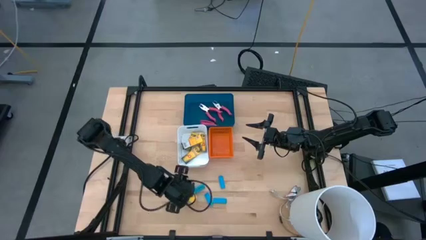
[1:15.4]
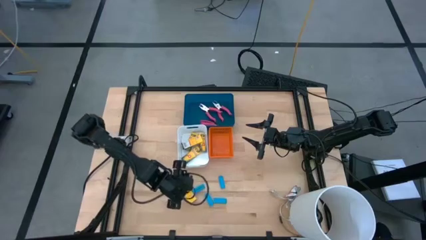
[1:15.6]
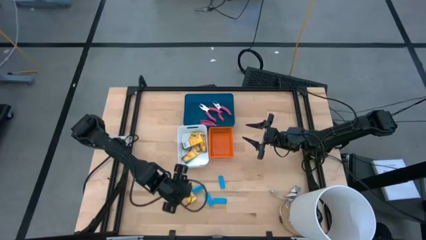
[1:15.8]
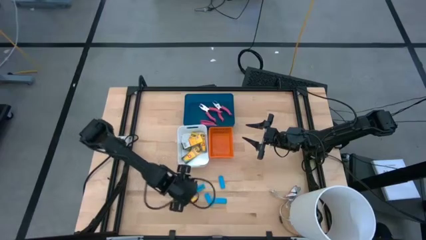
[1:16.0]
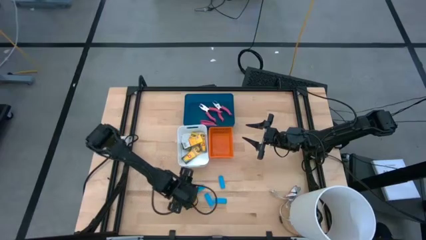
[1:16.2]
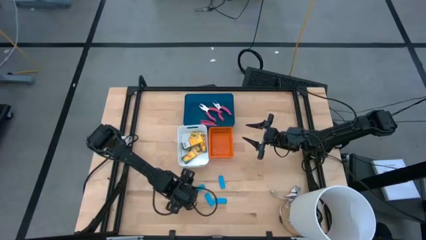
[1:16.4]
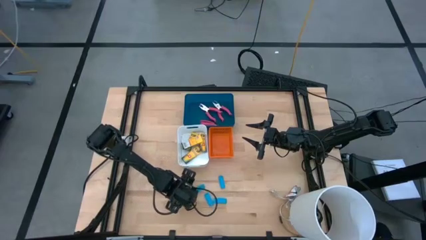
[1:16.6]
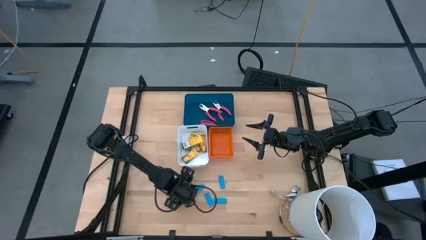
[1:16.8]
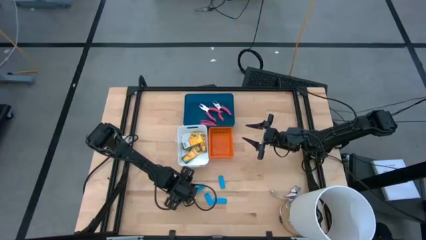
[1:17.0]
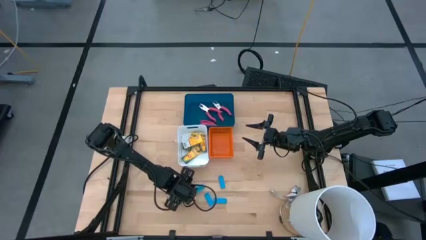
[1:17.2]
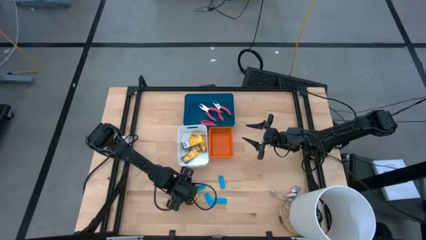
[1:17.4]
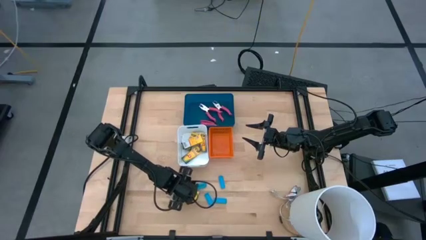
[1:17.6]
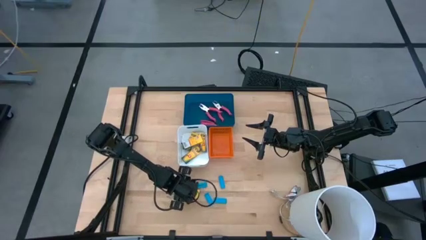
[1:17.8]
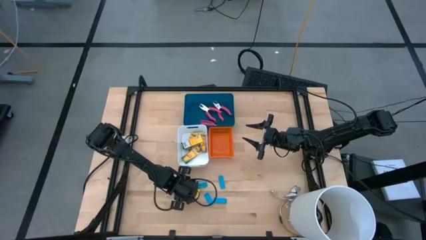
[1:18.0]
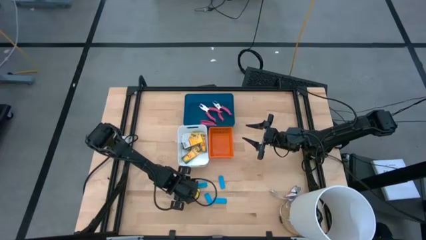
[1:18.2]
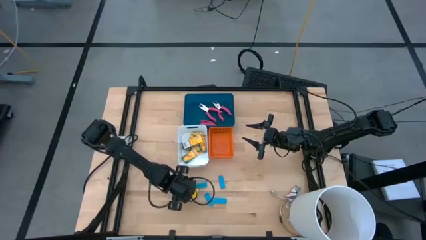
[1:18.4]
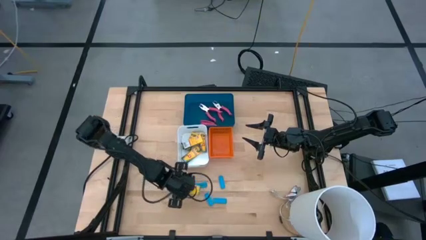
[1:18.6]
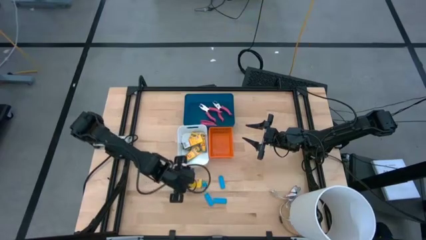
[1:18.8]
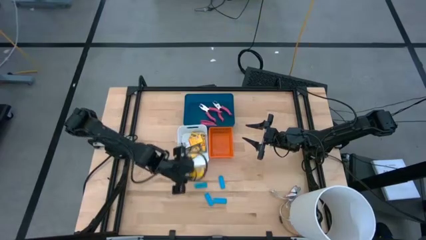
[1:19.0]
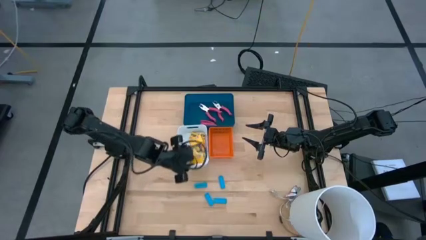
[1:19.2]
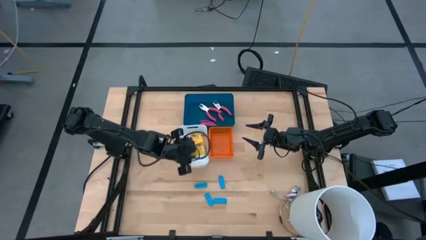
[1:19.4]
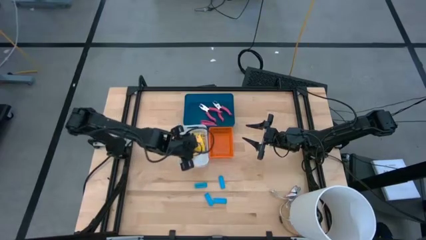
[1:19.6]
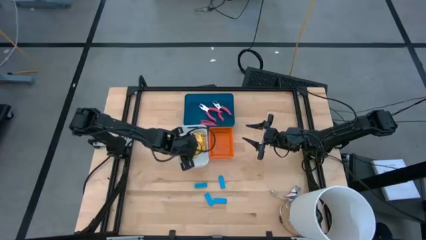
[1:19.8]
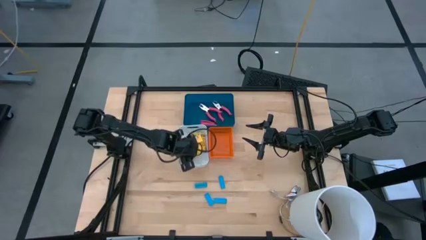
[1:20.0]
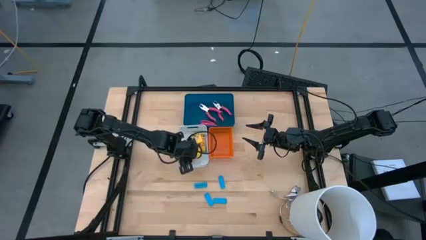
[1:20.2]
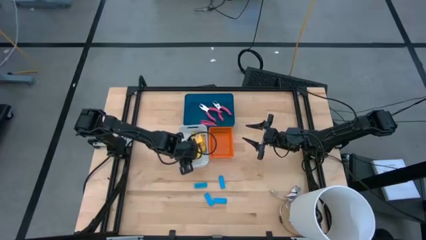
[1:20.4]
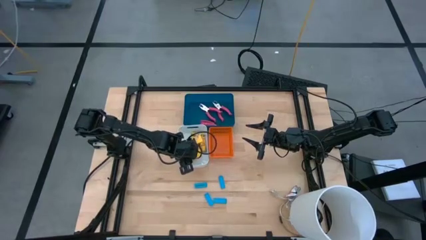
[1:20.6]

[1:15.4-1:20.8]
Task: Pick & Place School Supplies
Put the yellow crayon box into the white bin

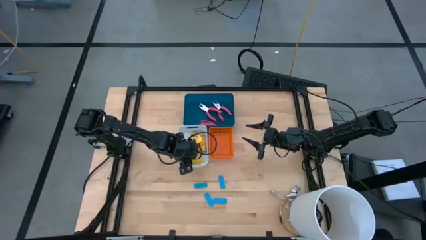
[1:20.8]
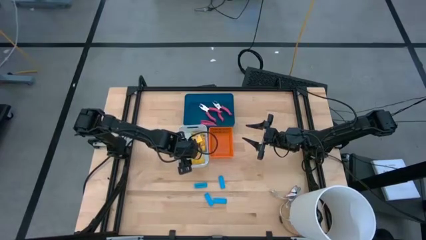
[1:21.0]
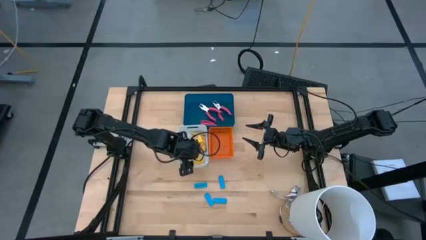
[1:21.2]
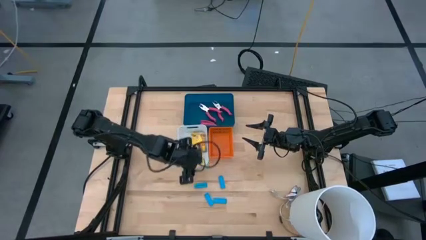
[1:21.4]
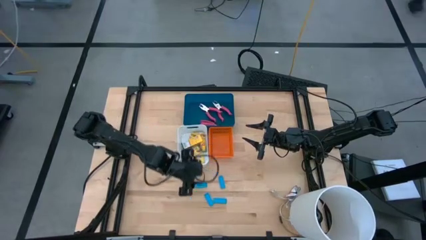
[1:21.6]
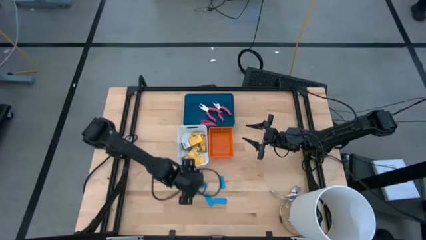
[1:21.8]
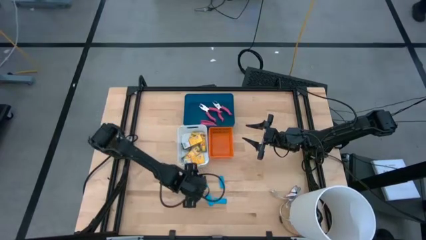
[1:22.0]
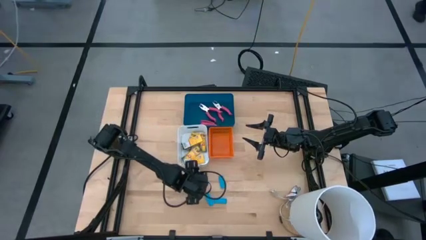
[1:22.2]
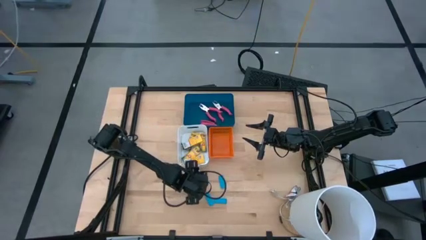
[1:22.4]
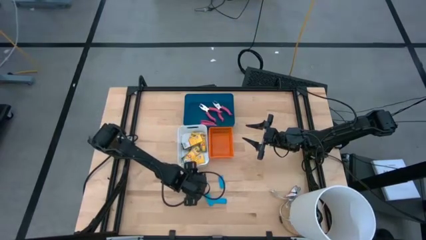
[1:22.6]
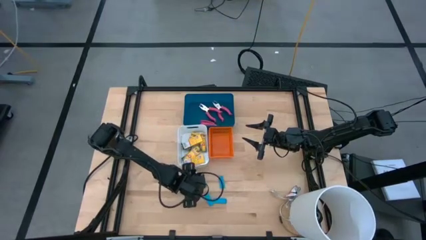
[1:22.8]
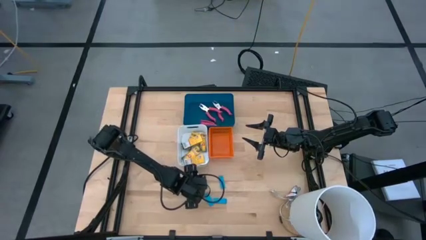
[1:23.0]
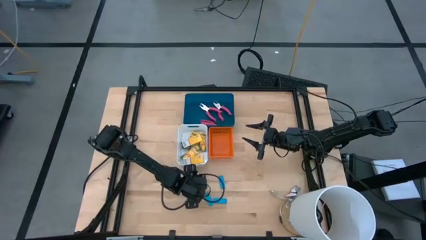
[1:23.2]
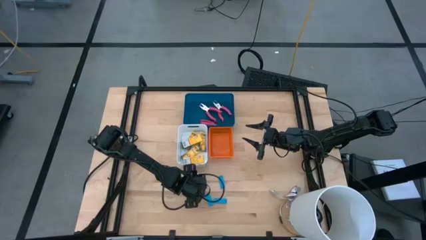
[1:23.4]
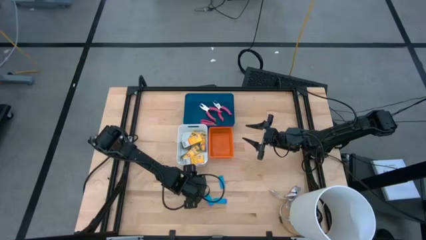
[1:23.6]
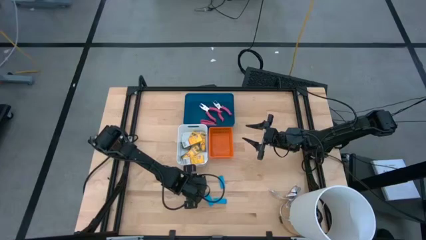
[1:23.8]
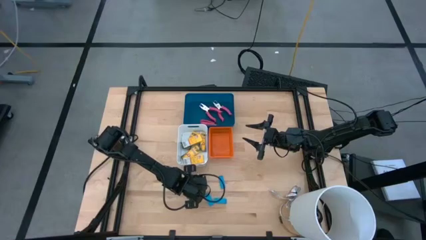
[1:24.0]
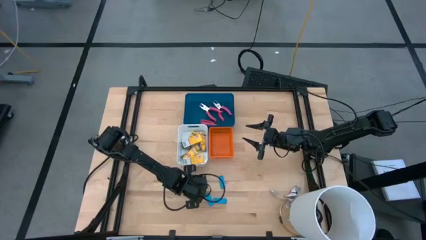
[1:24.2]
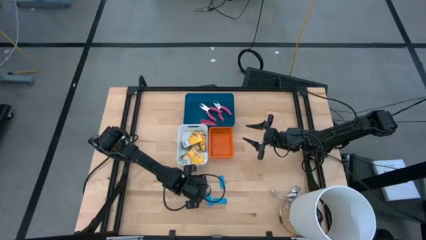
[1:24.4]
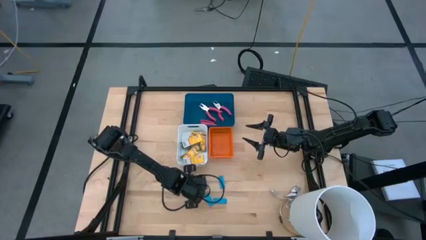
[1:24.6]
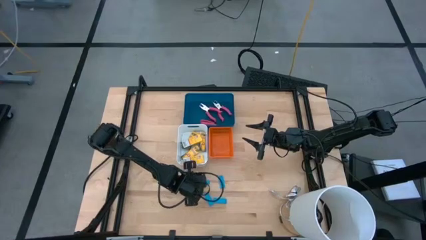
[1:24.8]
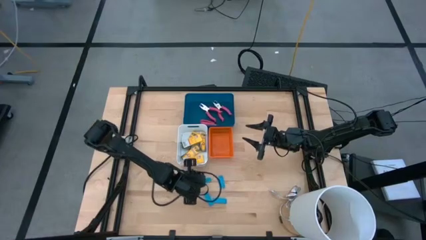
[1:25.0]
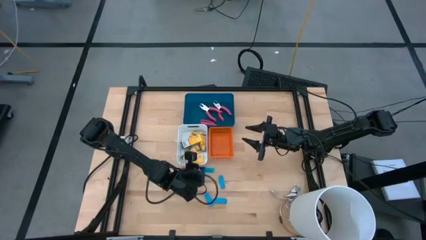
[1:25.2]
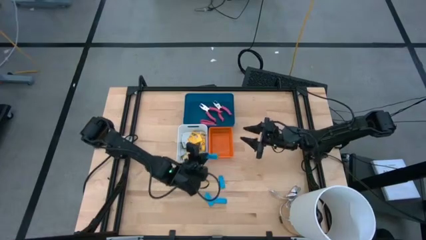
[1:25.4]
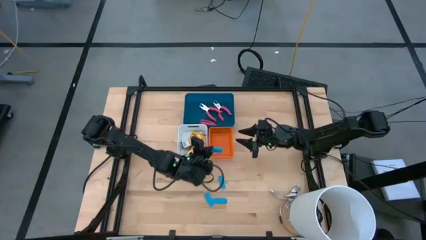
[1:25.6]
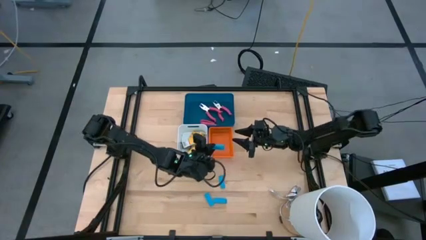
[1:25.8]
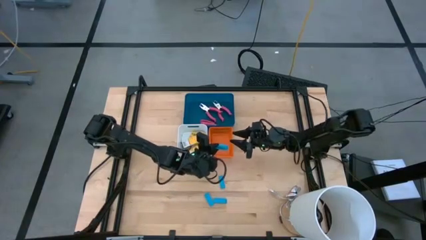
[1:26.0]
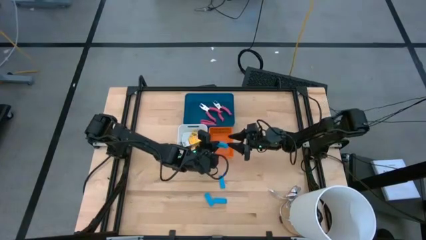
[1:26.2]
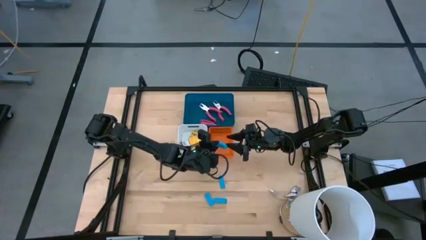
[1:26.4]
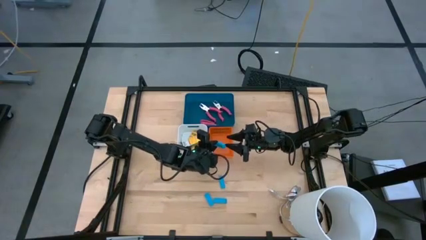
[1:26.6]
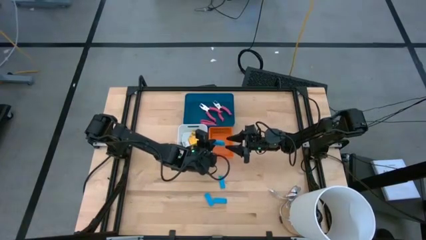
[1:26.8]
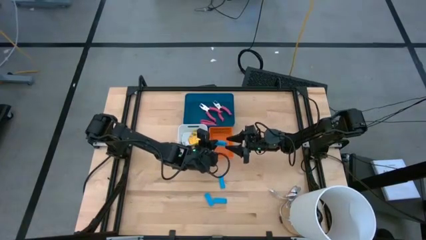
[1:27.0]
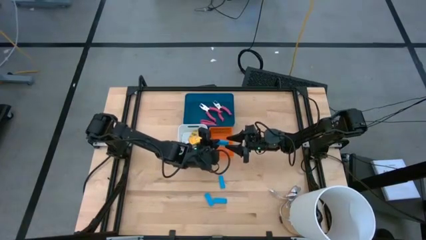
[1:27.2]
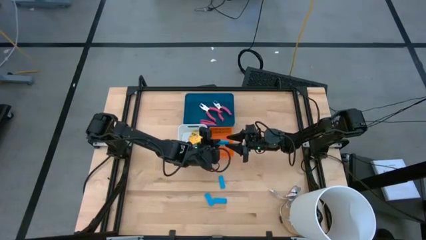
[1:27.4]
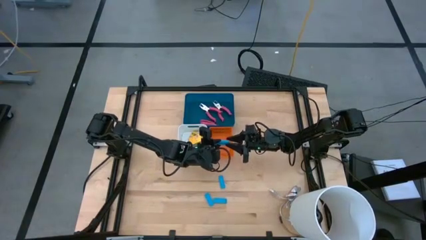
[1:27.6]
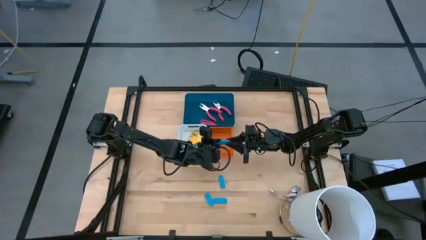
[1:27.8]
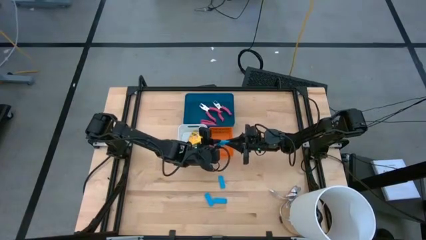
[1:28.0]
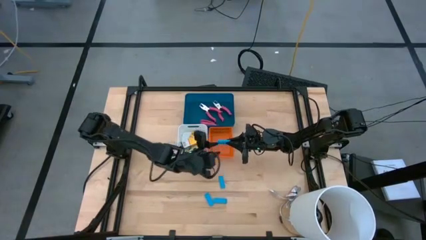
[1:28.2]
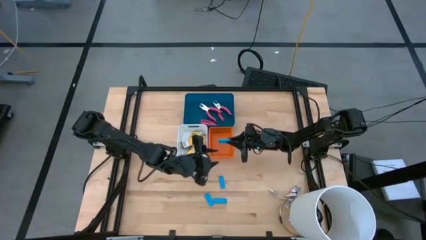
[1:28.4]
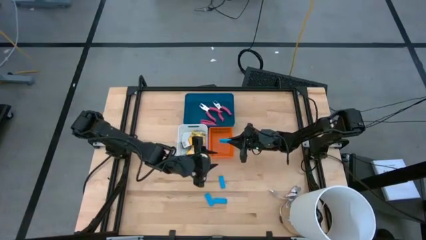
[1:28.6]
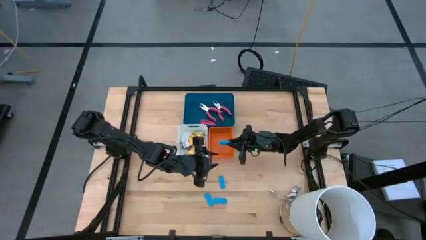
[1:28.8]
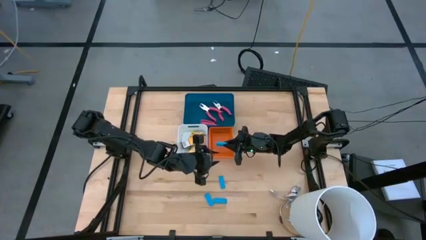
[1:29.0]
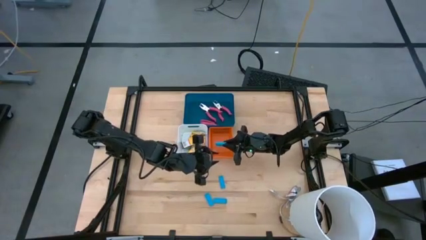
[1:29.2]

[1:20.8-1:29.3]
Put the blue eraser into the orange bin

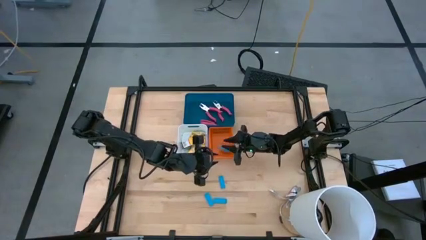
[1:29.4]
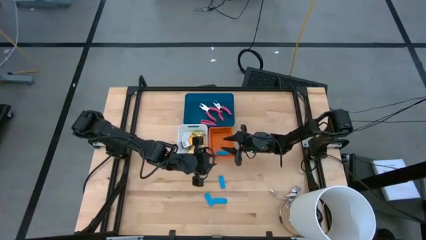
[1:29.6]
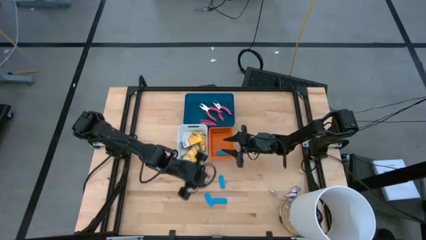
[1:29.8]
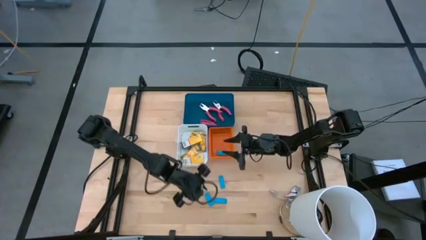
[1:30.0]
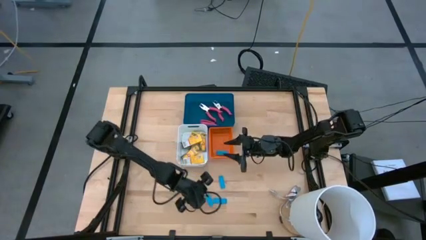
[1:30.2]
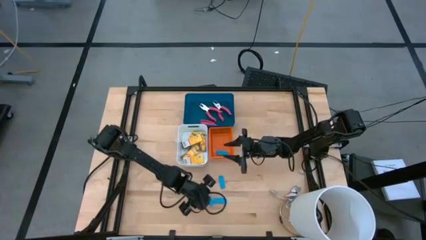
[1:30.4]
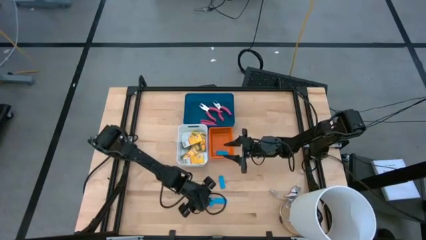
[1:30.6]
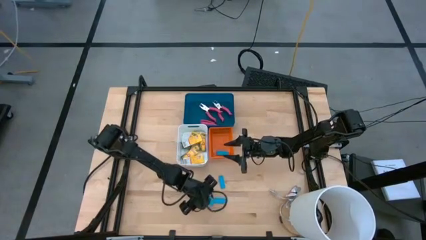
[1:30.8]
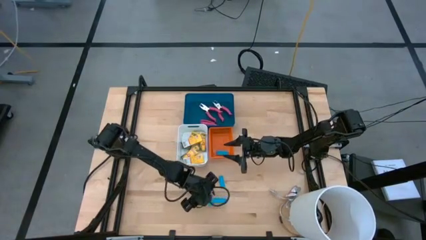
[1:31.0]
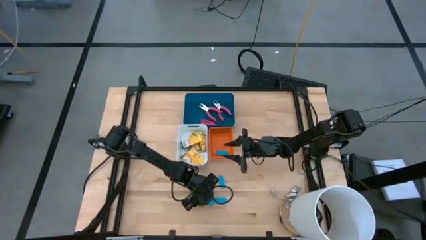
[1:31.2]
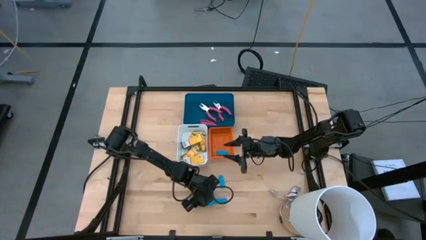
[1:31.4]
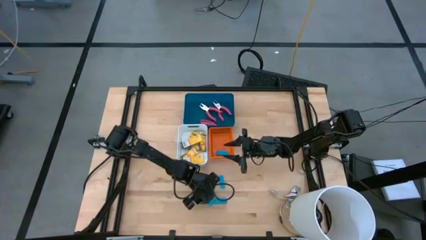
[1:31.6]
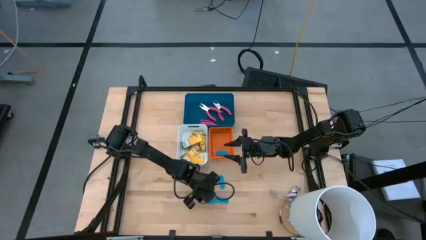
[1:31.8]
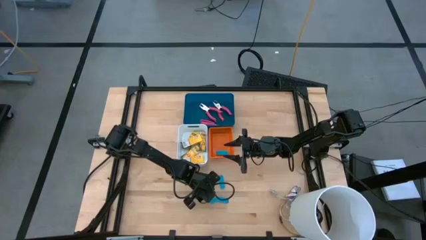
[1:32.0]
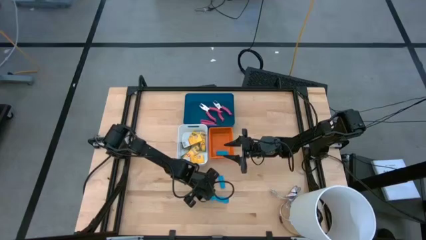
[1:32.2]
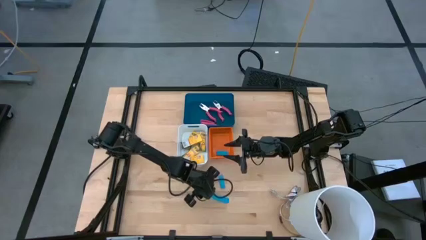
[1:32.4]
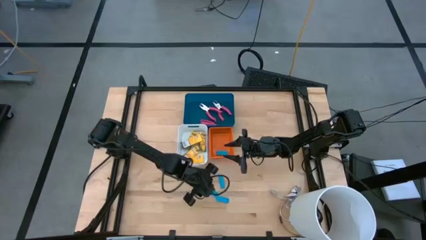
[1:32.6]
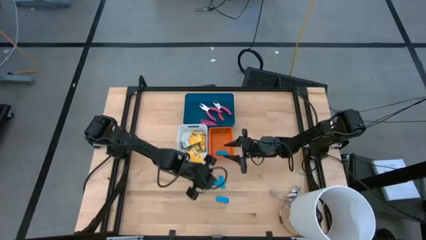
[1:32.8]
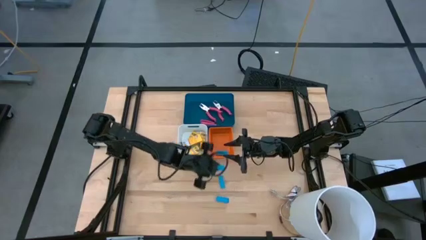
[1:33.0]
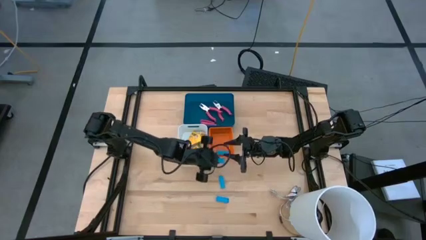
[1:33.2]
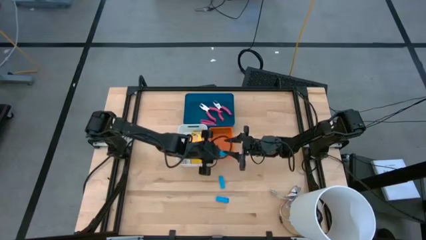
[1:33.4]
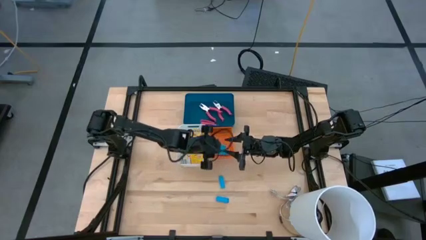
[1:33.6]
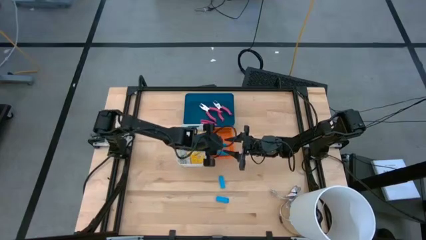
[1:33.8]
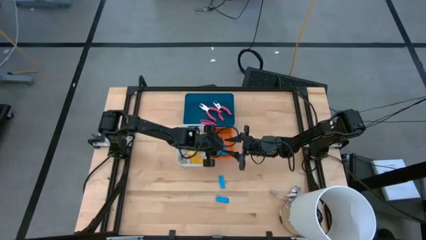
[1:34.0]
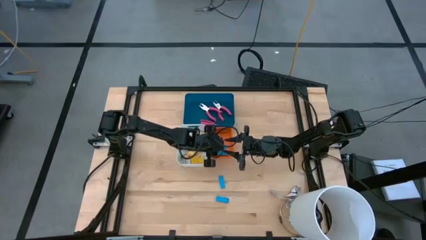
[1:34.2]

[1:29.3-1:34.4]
Put the blue eraser into the orange bin
